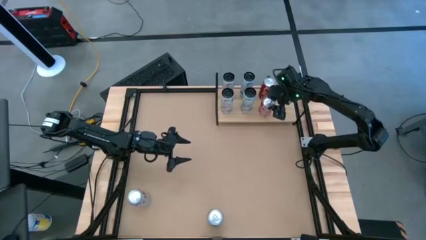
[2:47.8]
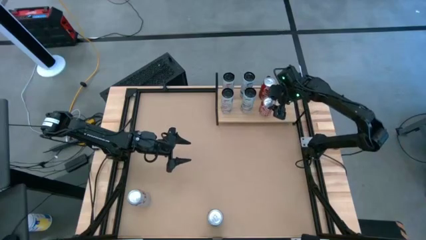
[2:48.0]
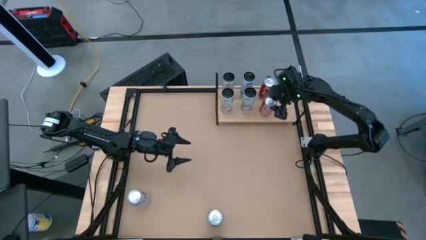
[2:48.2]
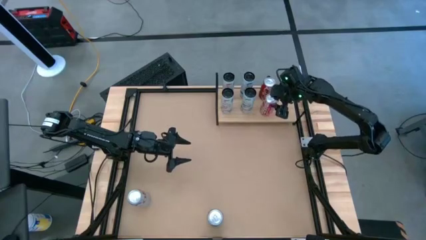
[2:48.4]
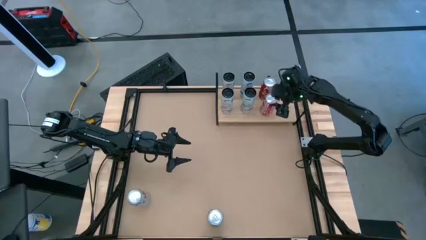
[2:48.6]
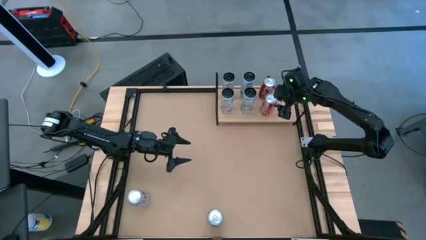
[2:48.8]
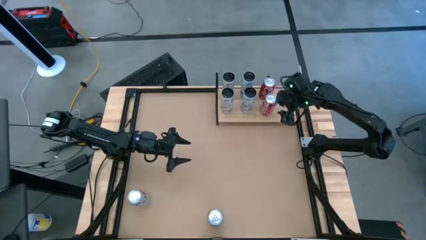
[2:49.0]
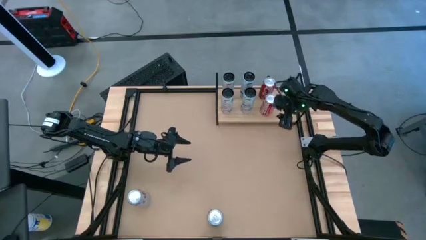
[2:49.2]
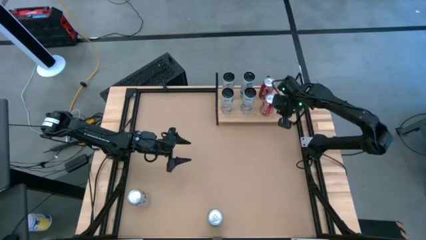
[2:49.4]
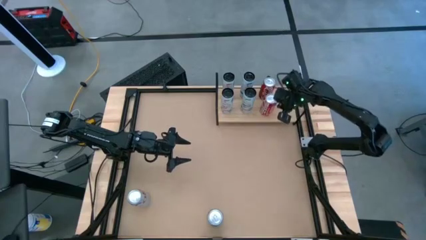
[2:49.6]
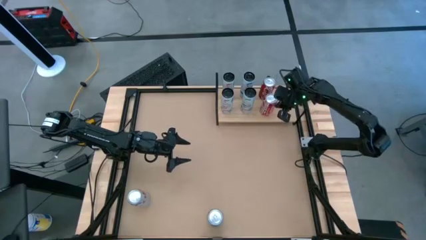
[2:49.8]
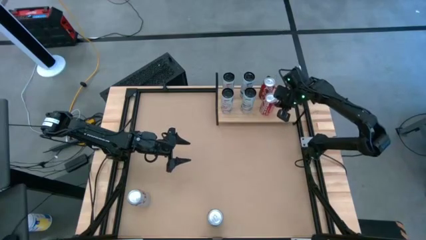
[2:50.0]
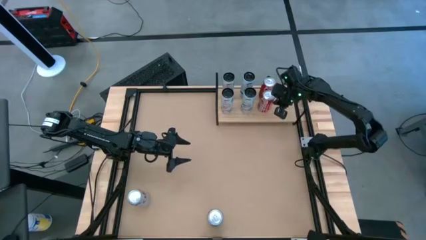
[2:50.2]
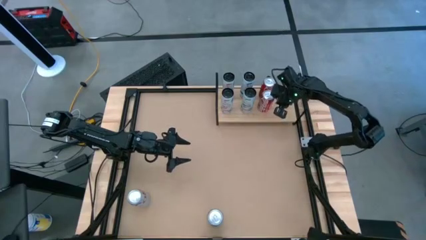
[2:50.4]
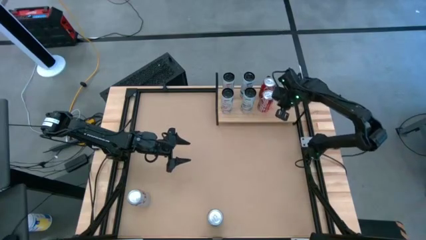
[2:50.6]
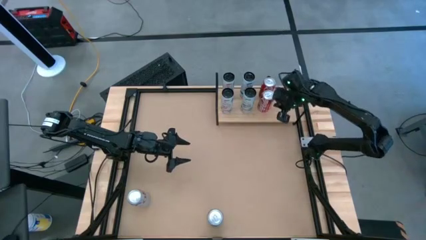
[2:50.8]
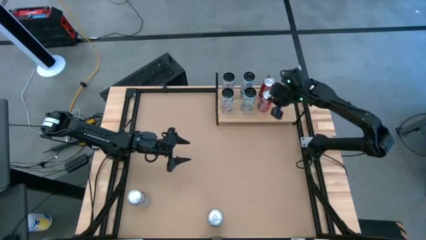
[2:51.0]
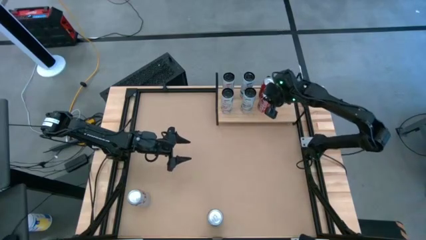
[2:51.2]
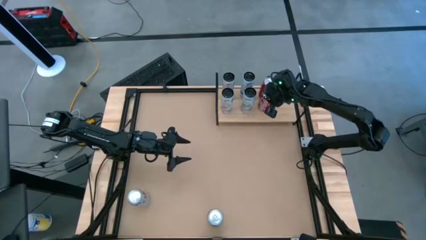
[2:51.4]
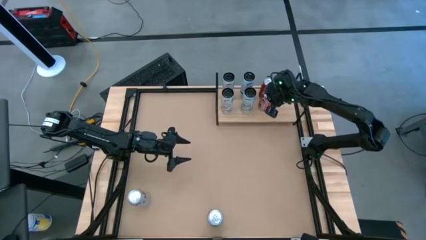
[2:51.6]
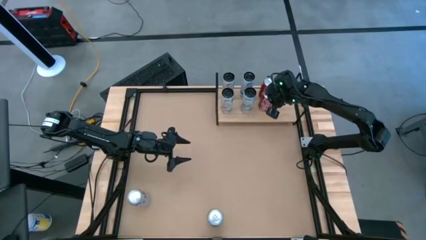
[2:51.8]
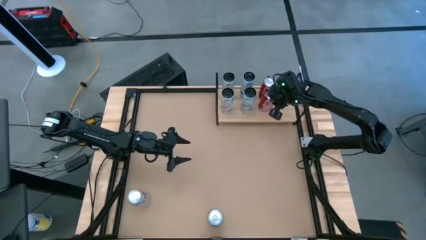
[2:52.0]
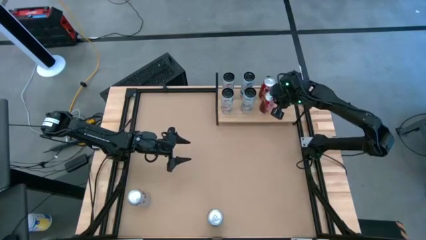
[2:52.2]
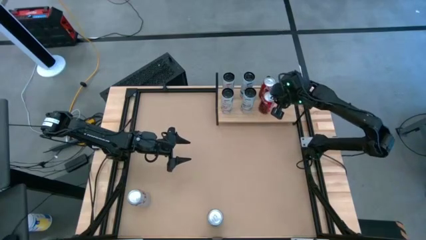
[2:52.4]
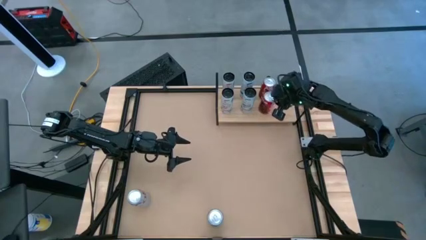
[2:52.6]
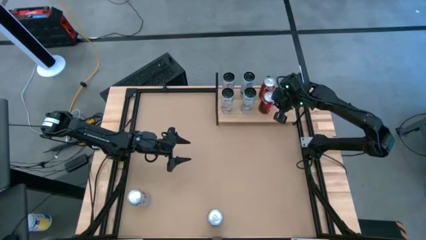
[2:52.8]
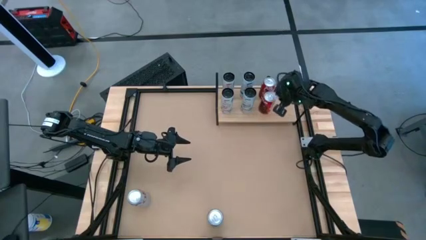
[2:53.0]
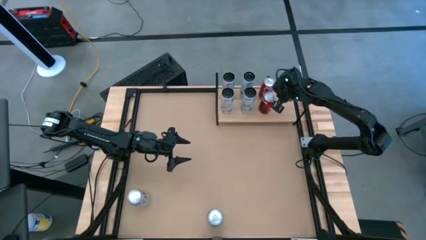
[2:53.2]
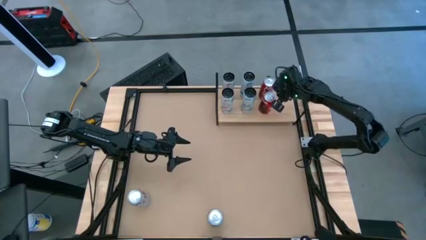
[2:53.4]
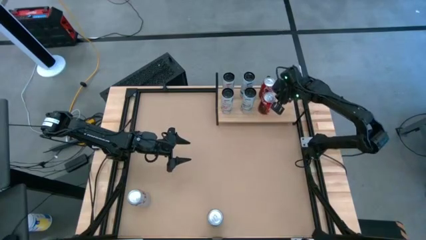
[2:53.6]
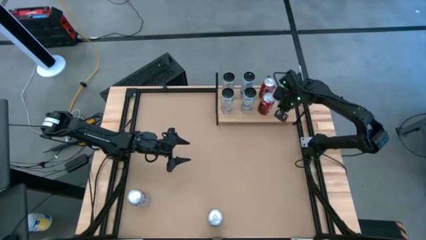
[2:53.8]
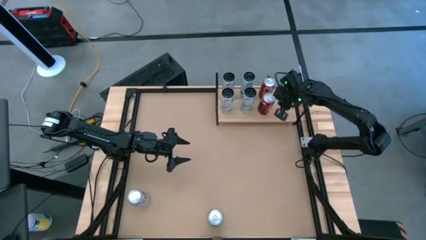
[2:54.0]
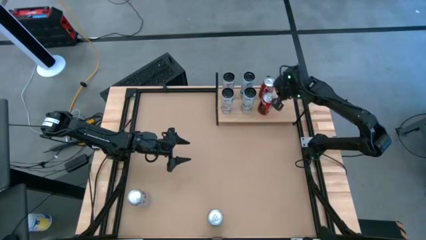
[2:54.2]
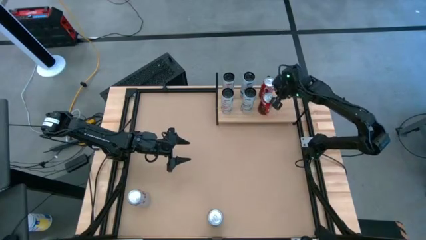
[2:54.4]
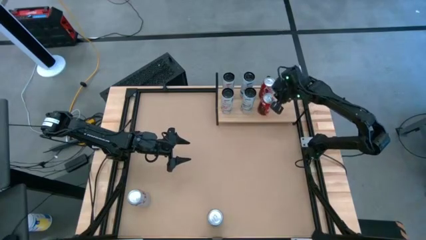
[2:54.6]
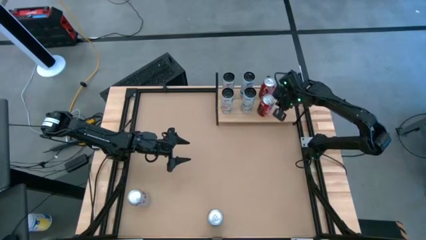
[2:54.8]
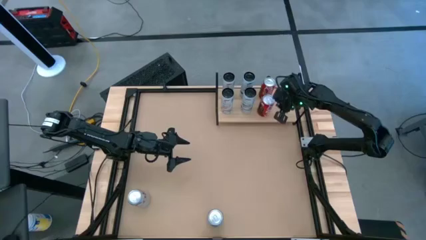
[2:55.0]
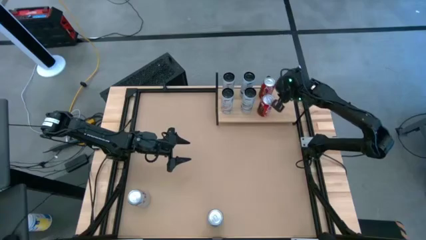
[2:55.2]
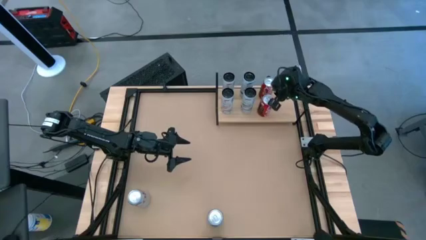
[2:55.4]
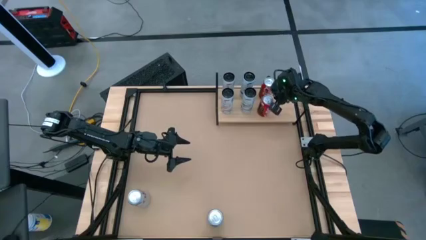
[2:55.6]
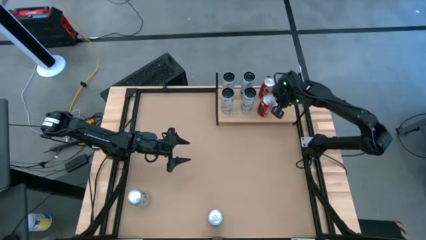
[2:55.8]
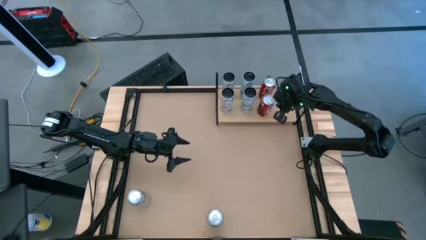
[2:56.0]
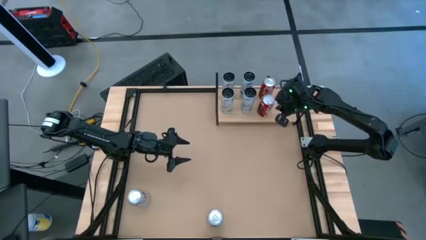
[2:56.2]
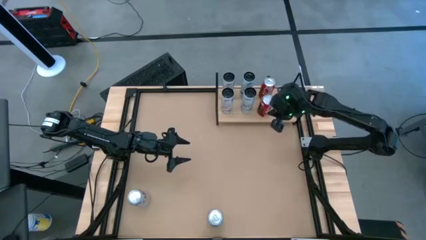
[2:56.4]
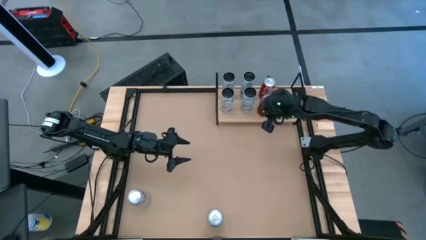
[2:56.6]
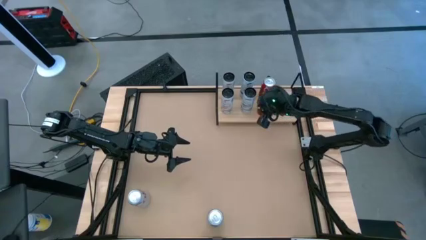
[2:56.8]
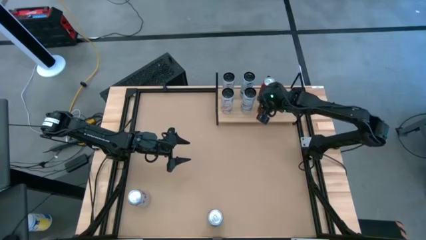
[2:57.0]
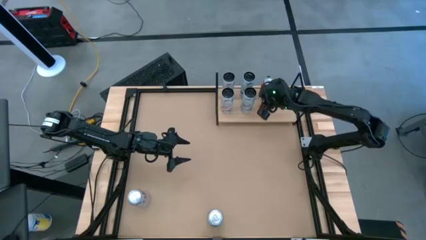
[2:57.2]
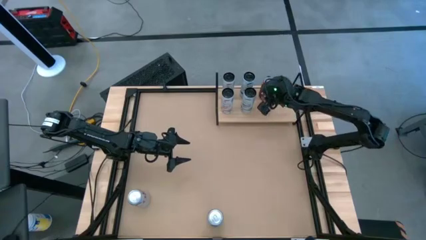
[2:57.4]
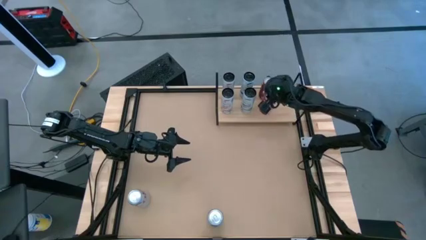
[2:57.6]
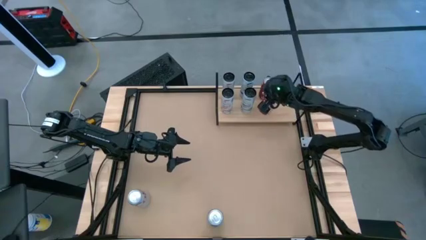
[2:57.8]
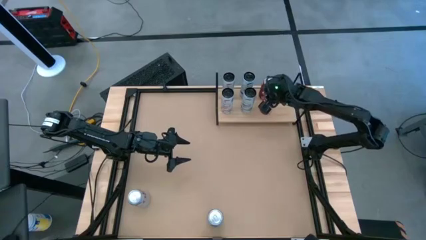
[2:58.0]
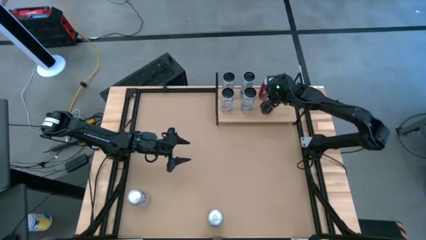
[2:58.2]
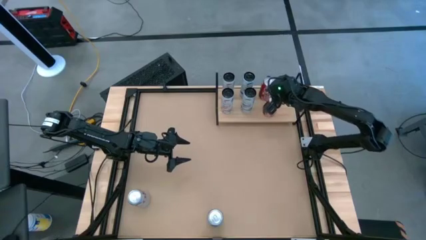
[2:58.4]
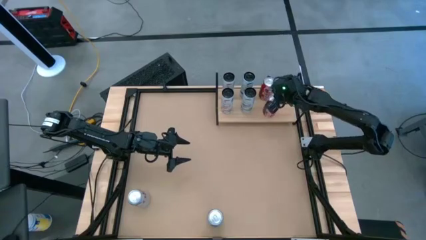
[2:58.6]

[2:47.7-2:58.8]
Task: Place canned beverage on shelf
Put the red soda can on the shelf align with the other red soda can

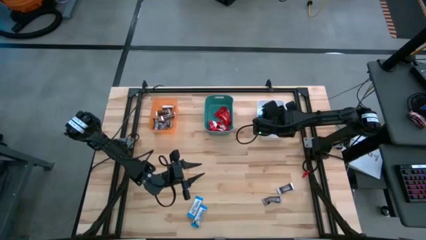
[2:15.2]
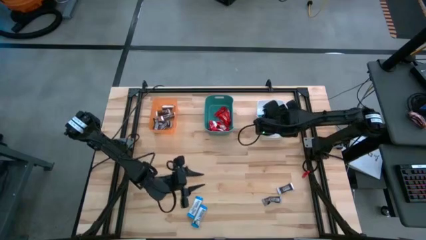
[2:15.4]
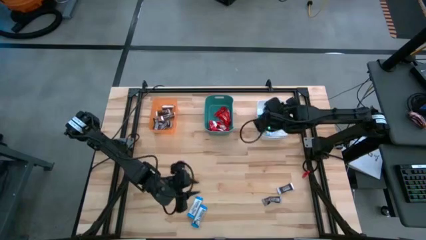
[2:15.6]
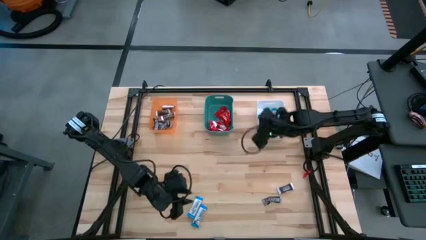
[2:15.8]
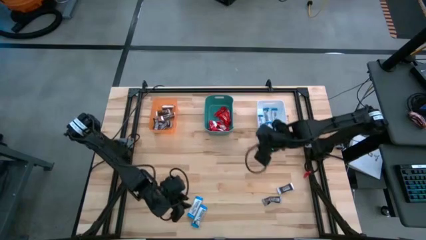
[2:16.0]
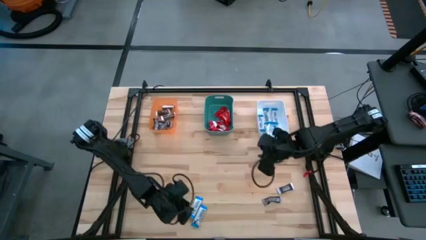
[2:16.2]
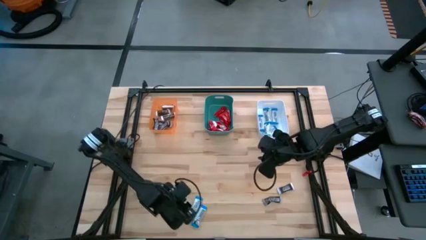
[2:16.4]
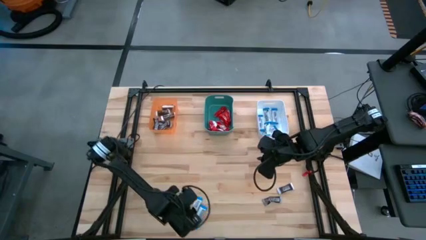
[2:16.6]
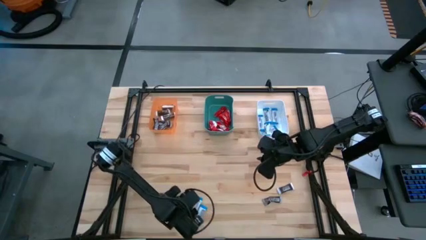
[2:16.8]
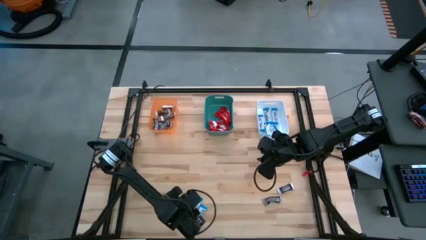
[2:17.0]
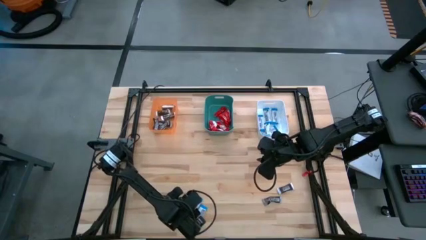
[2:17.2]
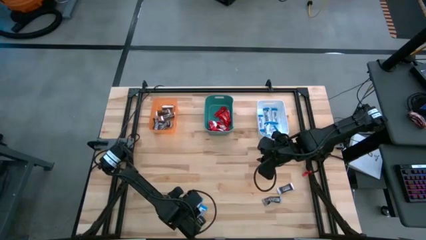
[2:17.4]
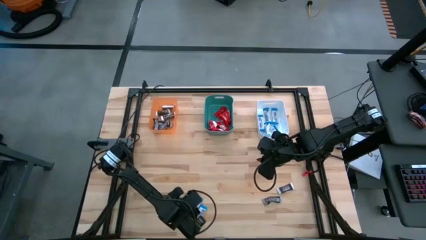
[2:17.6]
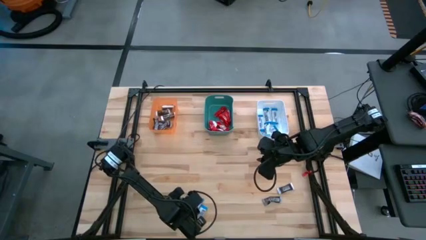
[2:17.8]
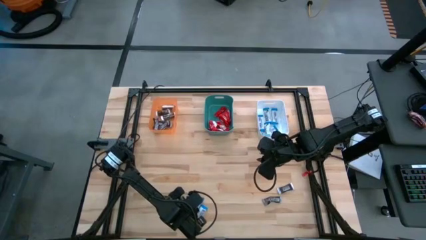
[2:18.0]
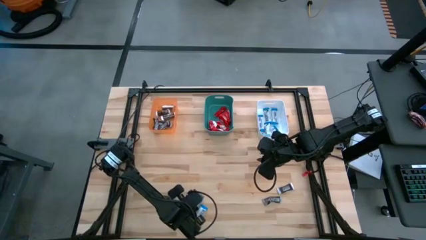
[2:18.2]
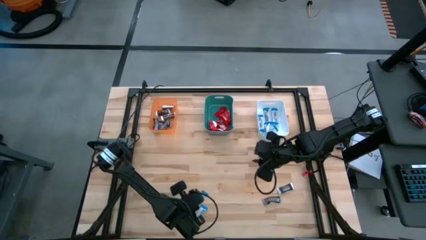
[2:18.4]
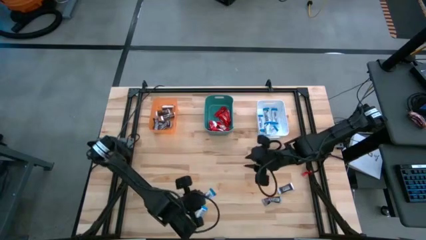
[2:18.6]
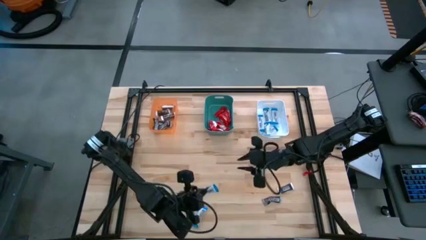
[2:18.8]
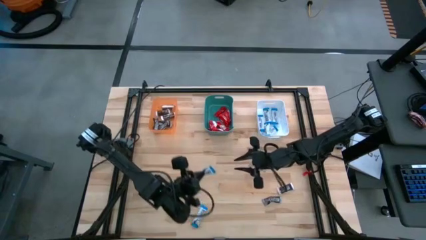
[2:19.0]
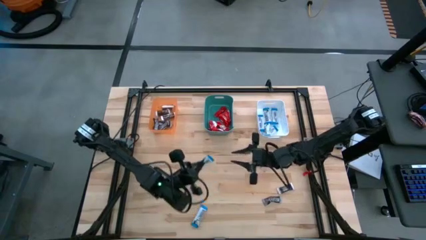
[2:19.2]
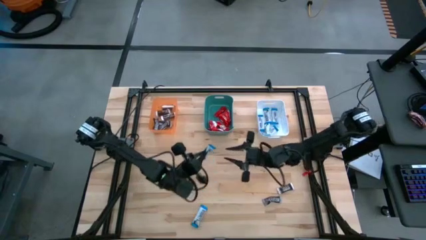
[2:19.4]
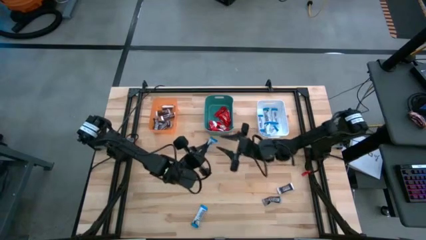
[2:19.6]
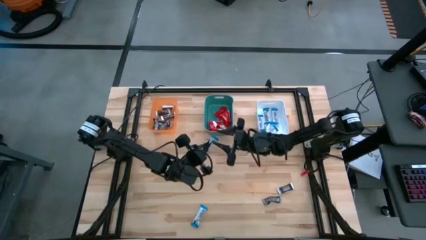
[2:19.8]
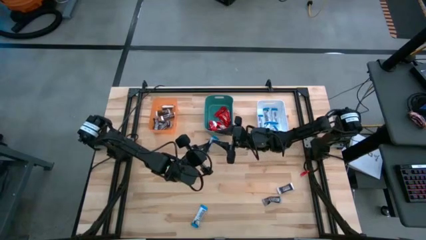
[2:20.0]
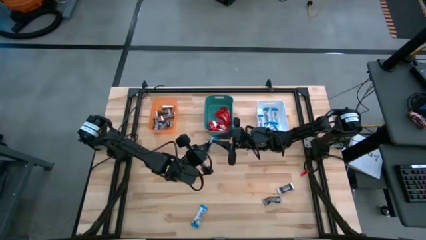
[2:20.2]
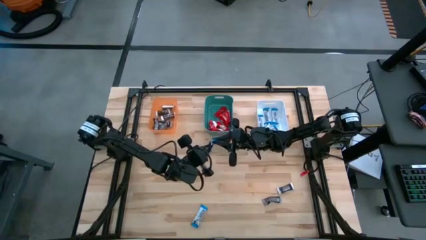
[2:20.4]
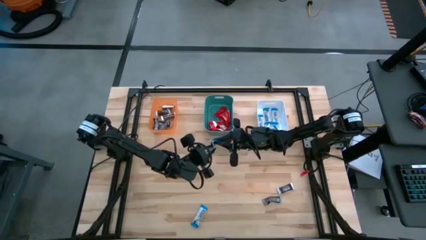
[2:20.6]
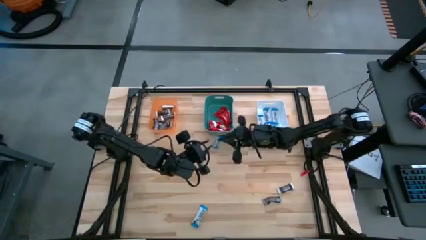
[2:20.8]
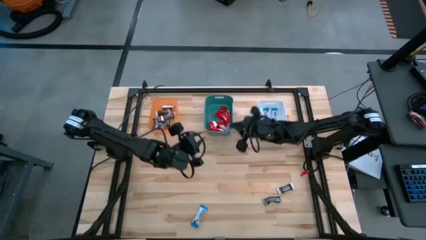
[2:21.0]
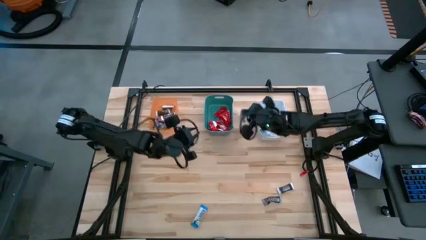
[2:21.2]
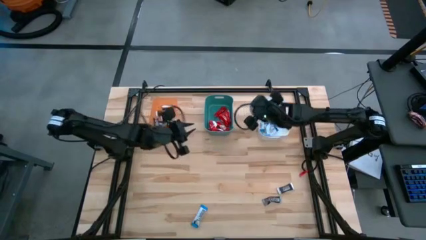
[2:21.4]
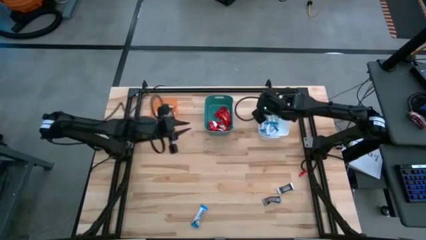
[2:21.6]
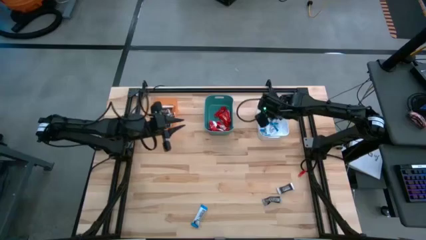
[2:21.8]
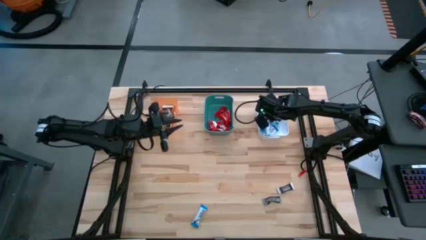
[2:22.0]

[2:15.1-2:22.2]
Task: Organize candy in baskets
Put the white chocolate bar into the white bin
